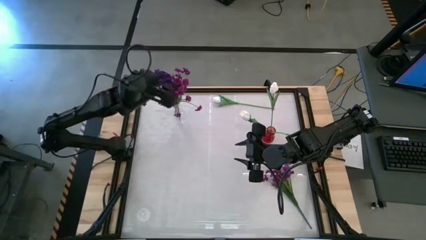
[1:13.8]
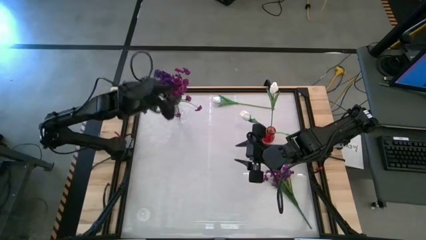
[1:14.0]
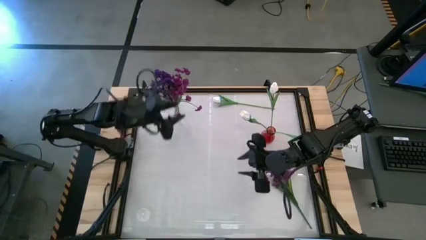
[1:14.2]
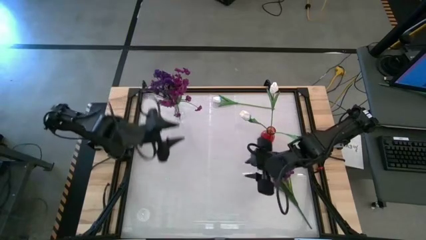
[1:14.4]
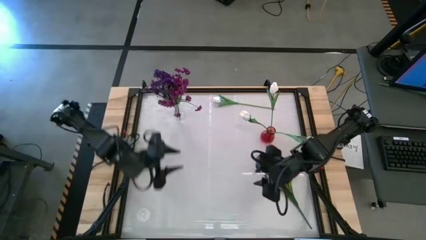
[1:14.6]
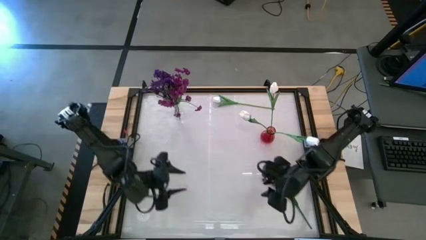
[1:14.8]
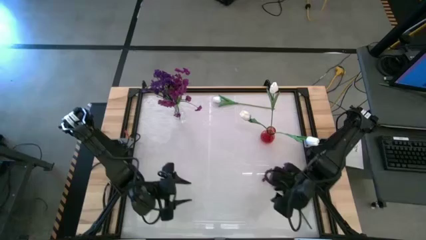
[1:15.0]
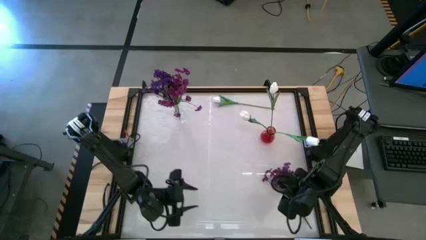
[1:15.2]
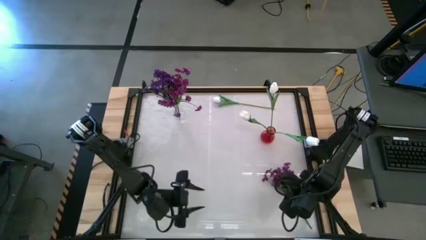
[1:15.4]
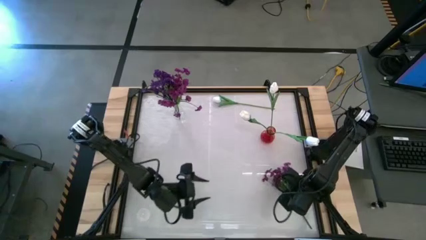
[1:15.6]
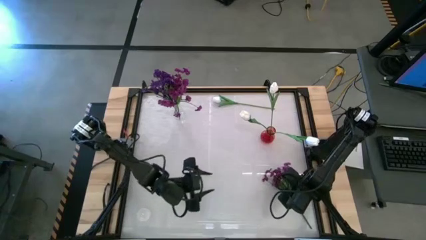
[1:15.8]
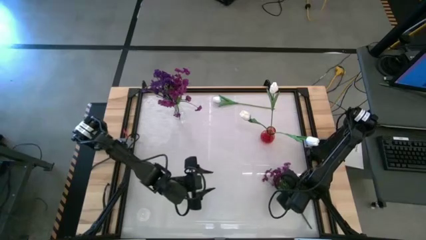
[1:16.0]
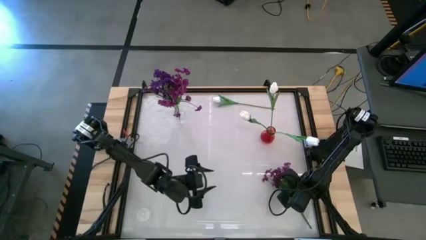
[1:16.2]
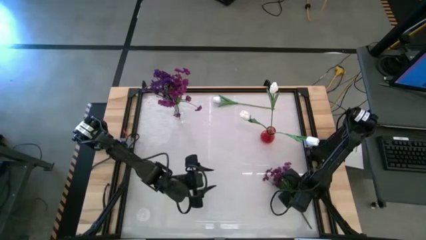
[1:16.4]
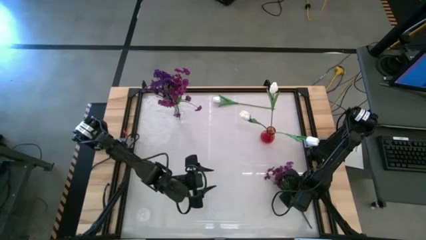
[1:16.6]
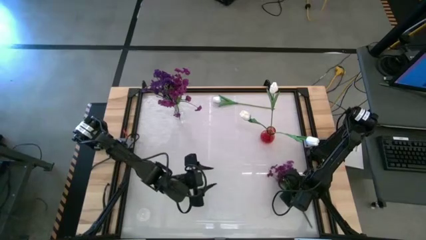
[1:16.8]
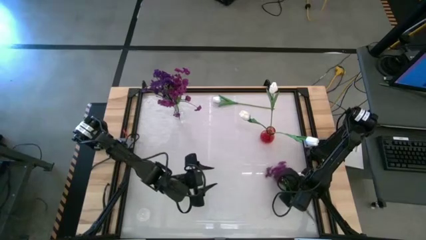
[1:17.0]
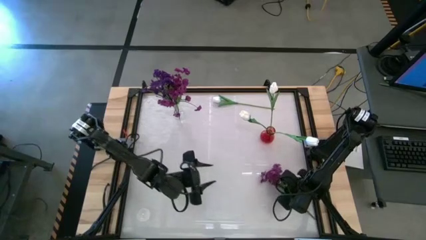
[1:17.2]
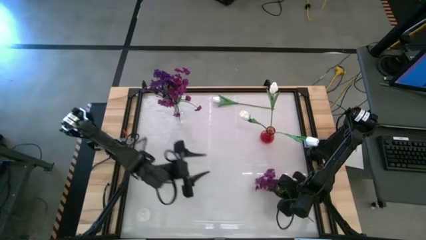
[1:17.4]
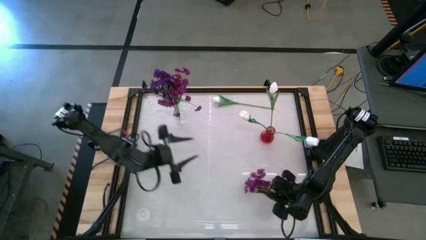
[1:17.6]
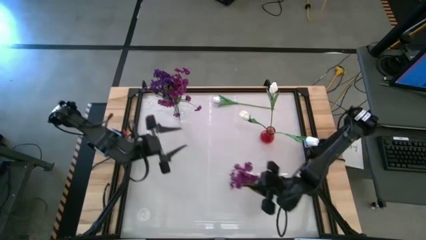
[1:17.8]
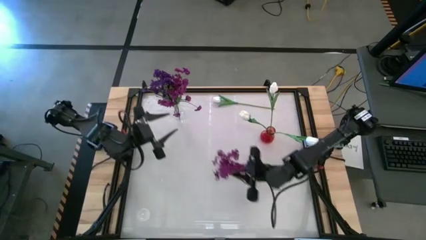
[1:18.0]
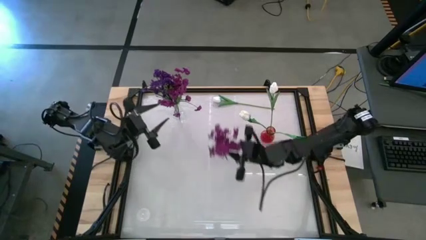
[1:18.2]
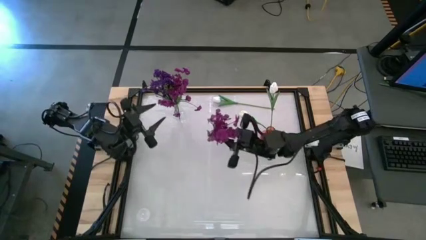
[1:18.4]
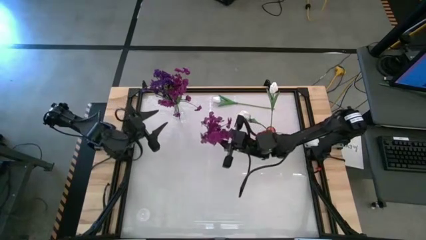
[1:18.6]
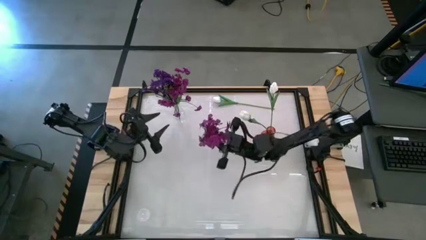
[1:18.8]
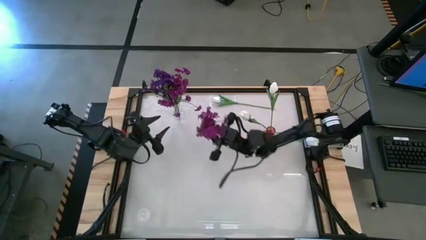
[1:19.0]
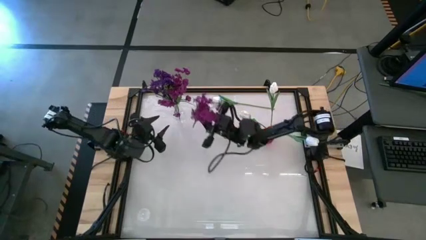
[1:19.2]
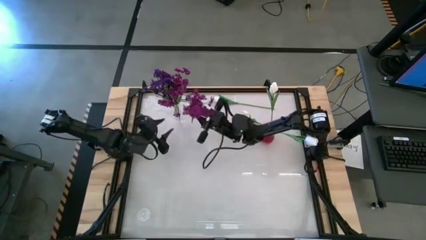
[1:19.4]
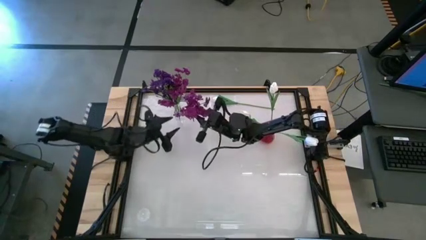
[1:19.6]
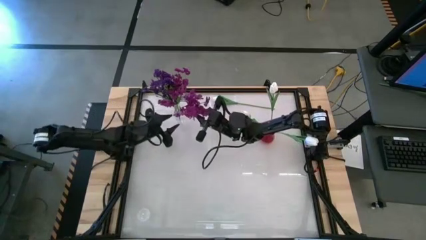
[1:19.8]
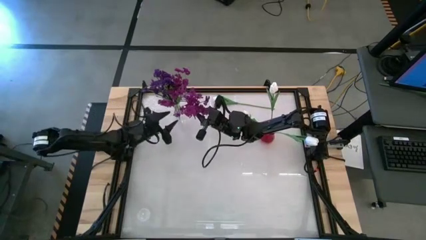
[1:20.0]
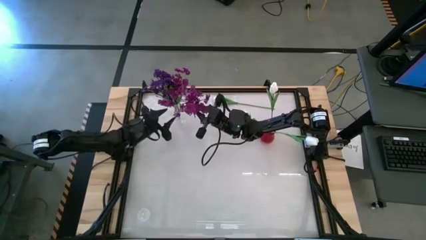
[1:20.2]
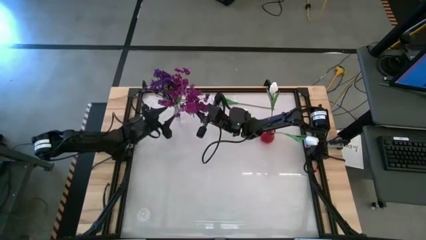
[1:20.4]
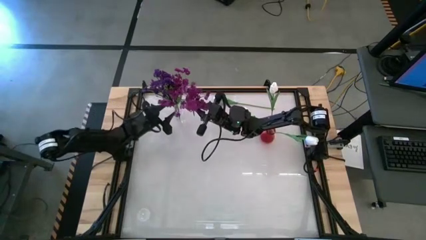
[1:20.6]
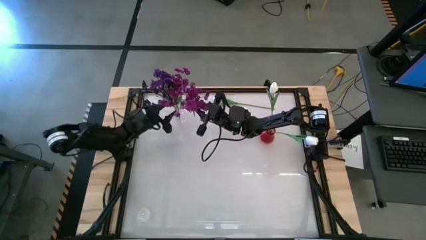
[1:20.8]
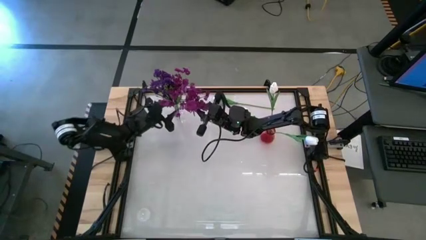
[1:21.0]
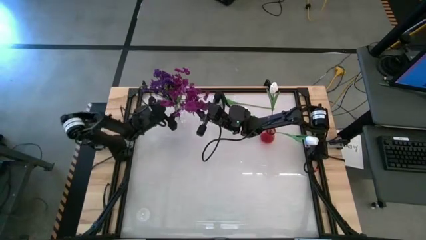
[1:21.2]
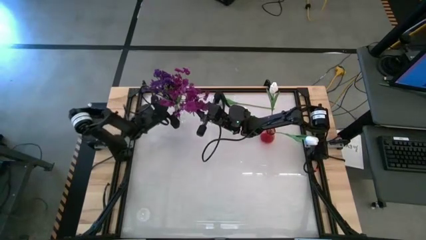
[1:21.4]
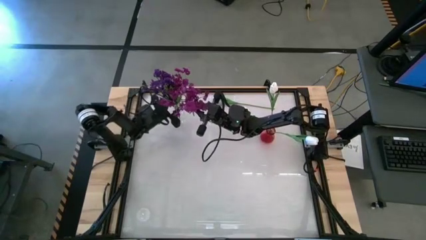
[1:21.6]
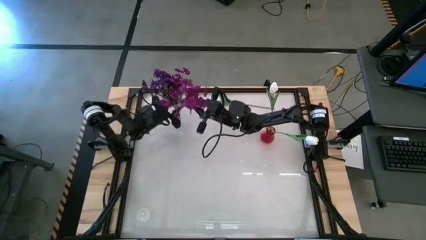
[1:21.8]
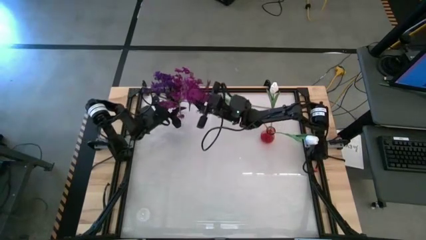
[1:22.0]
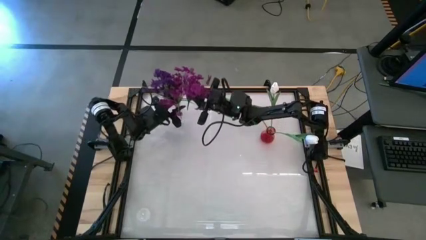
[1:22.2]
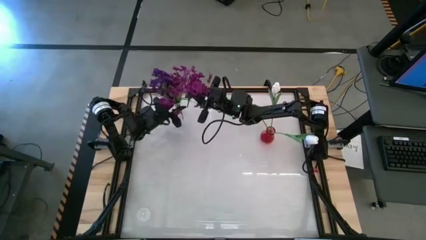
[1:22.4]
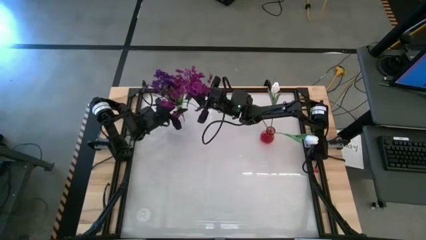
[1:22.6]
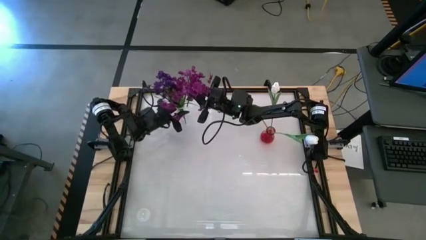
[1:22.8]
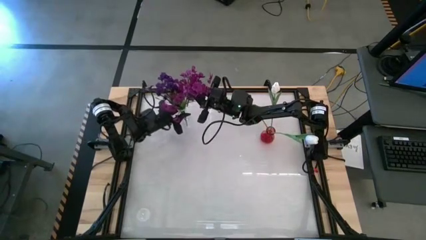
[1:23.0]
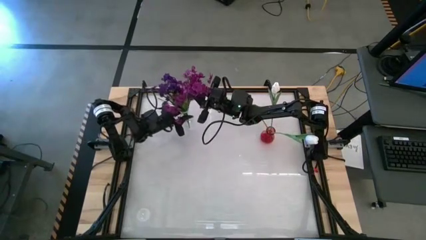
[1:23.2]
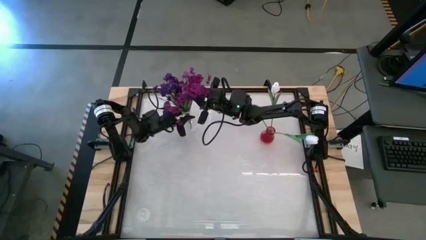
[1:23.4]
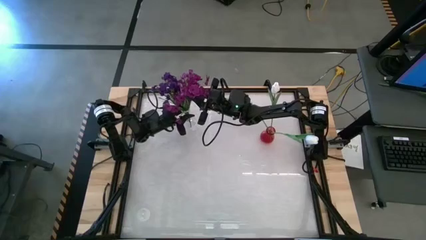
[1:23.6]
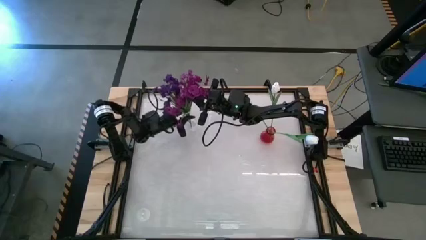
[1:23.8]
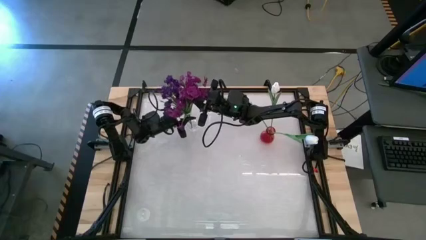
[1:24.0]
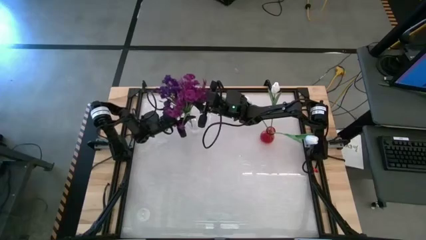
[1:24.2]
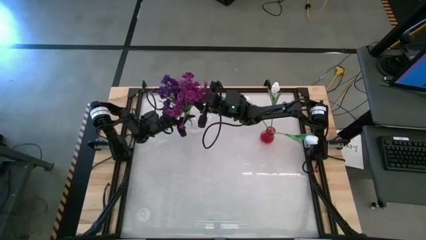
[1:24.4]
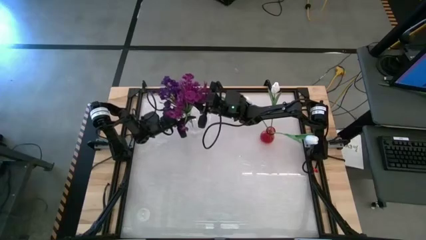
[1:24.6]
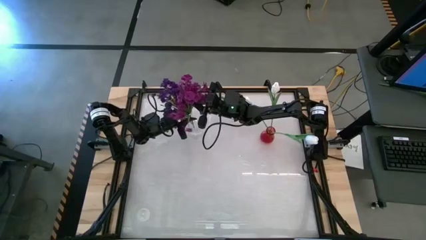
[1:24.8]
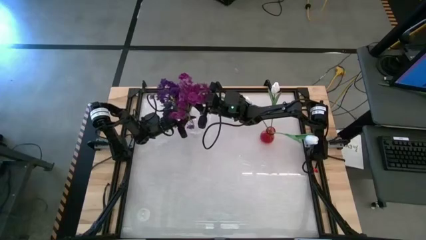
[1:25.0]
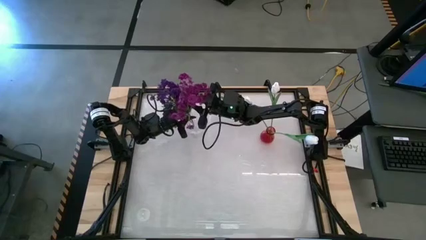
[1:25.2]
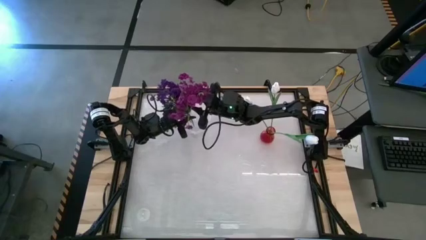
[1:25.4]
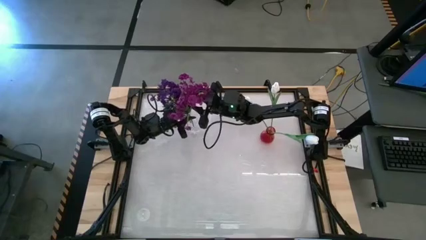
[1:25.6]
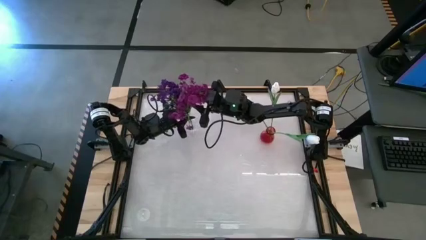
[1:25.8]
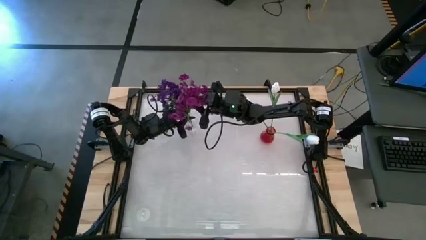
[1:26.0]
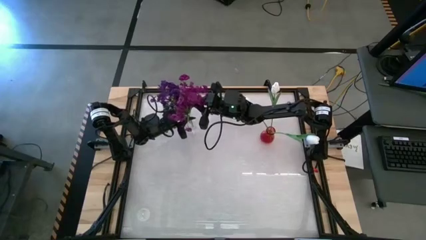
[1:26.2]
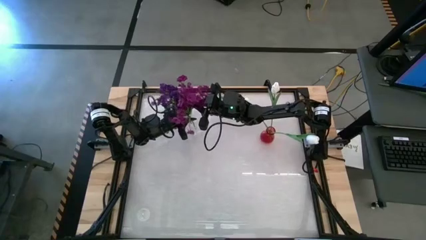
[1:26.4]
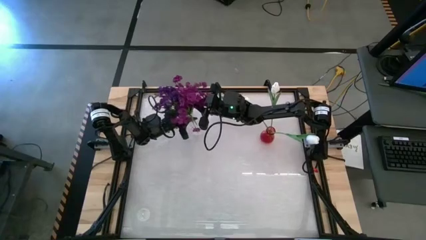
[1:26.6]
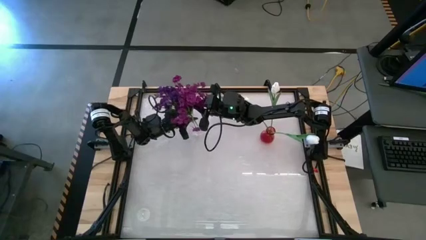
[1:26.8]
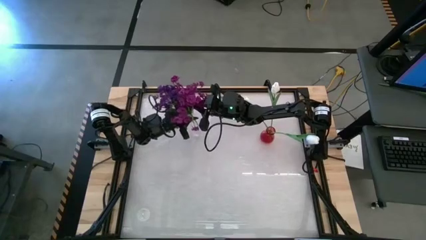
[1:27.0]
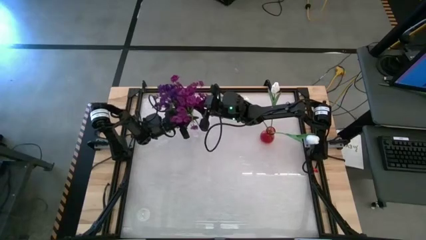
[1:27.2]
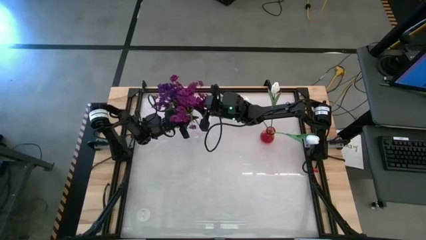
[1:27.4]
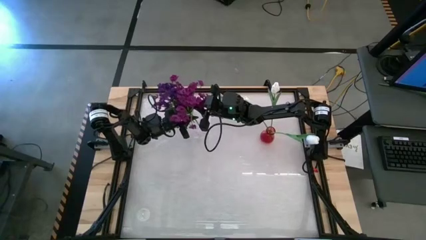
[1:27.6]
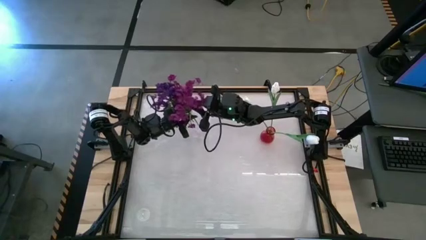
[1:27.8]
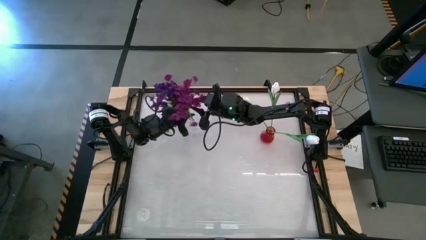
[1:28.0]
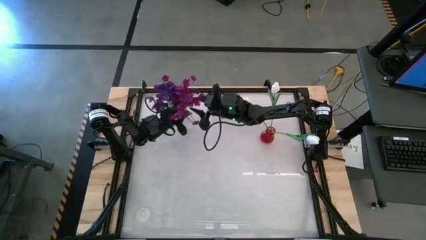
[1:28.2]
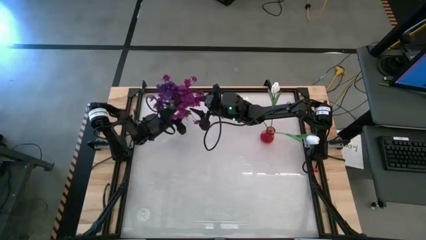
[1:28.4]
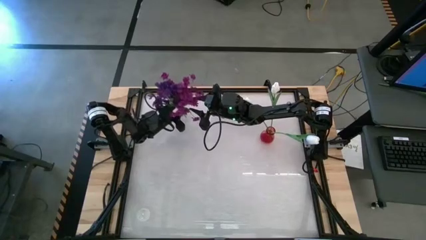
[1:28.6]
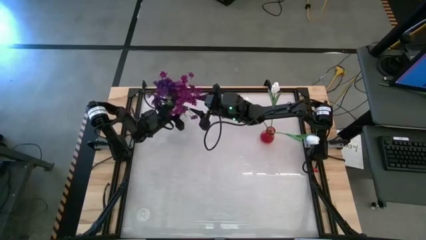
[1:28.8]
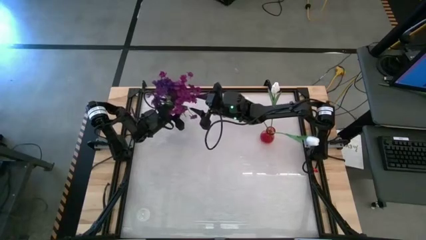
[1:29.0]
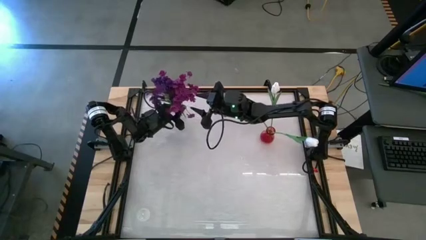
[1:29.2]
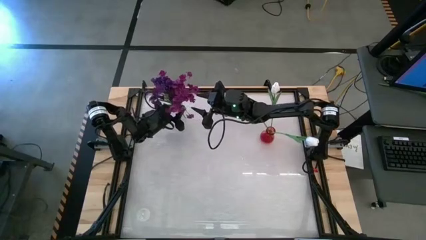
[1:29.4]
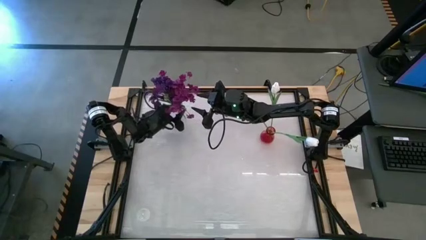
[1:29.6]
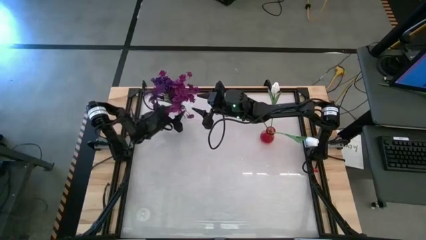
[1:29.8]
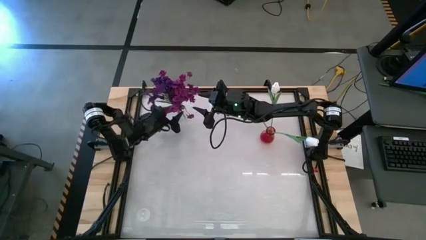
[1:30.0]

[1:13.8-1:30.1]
Task: Sort flowers into vase by color
Put the violet flower into the transparent vase

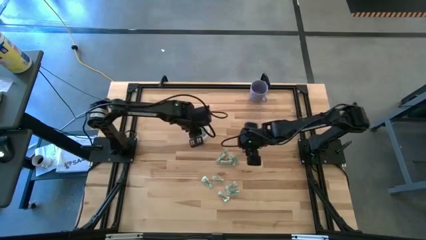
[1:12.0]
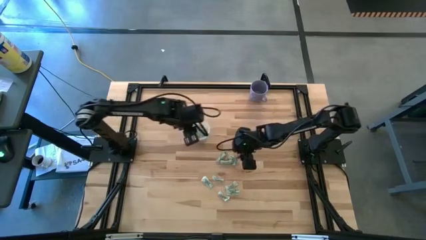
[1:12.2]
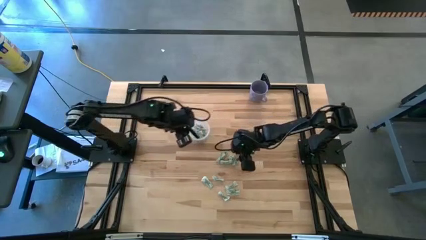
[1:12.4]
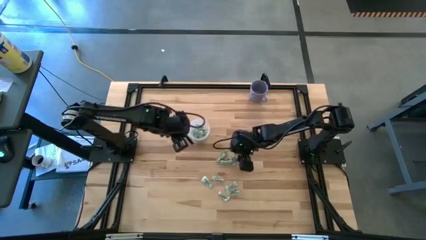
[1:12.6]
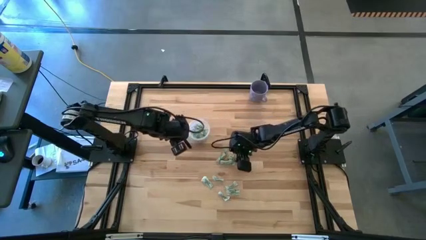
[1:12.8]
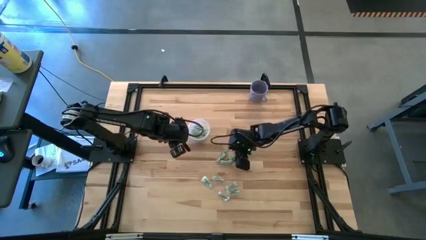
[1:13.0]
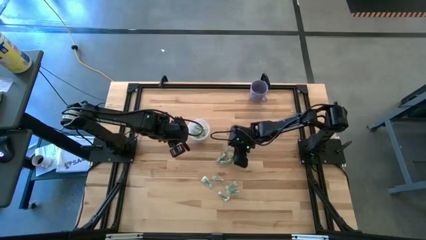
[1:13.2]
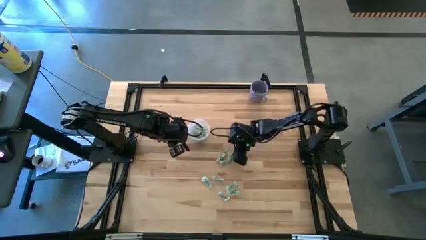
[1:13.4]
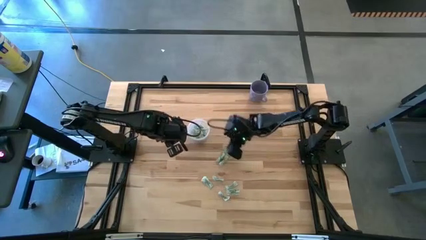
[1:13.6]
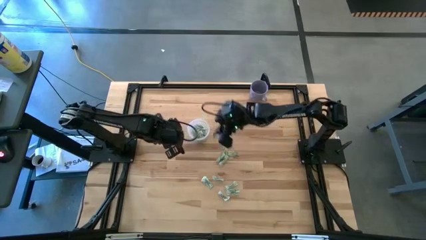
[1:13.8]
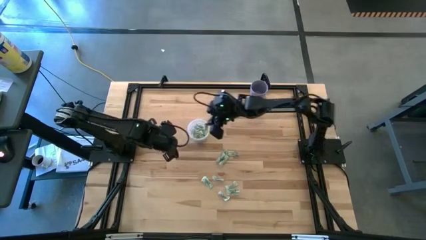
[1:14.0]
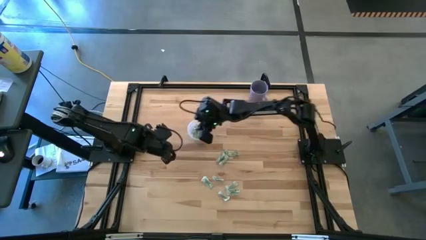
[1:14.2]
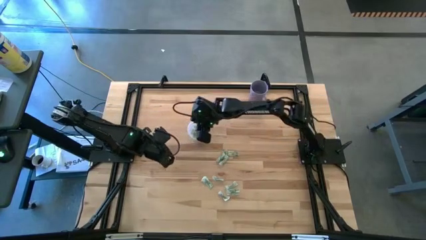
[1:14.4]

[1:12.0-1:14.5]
Task: Pick and place Stevia / Truvia into bins
Put the white stevia packet into the transparent container
